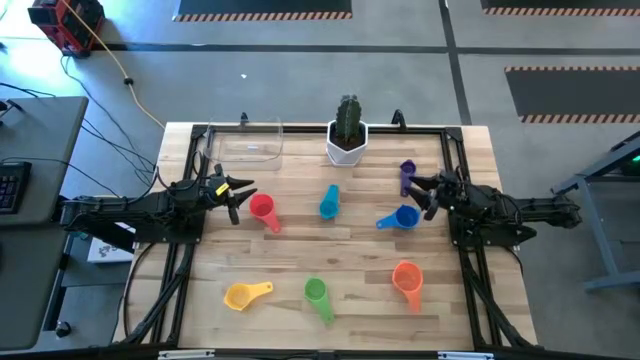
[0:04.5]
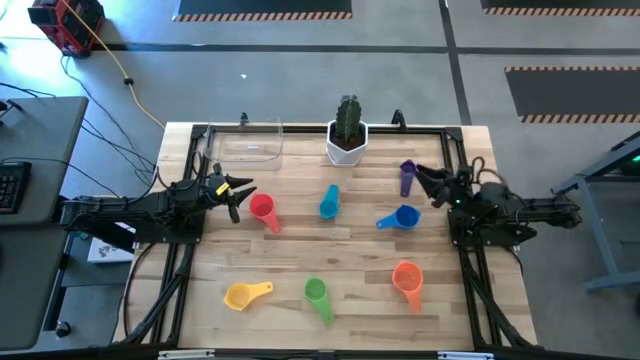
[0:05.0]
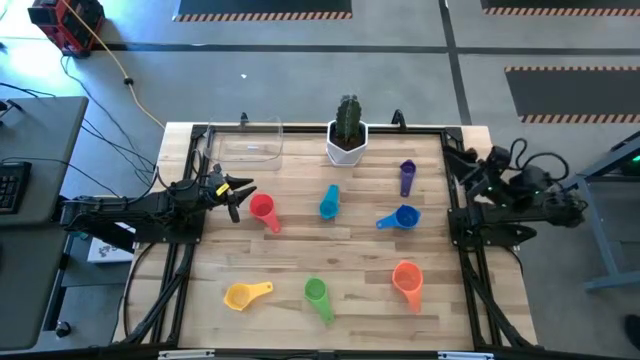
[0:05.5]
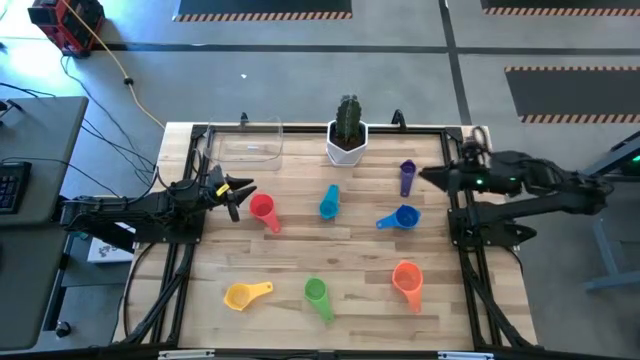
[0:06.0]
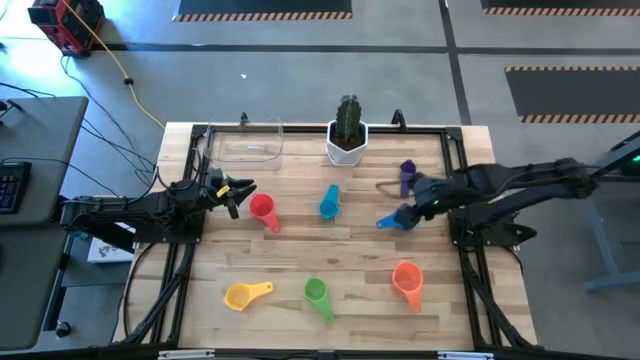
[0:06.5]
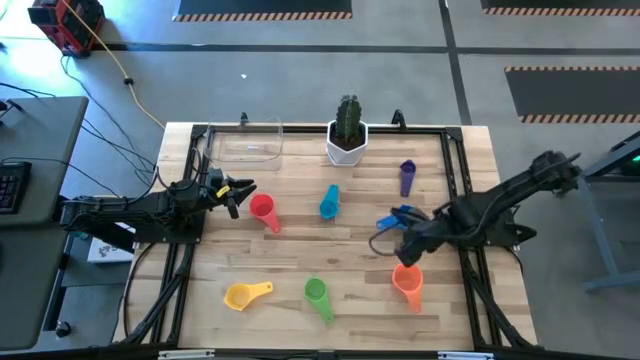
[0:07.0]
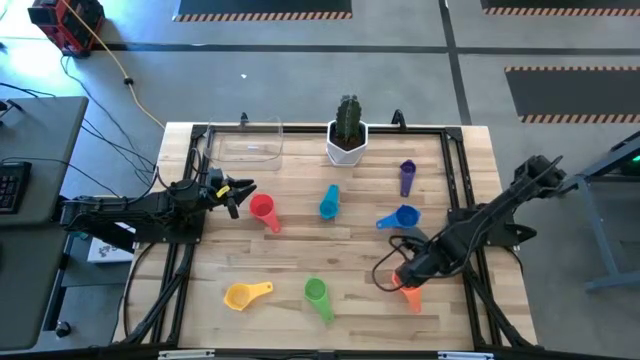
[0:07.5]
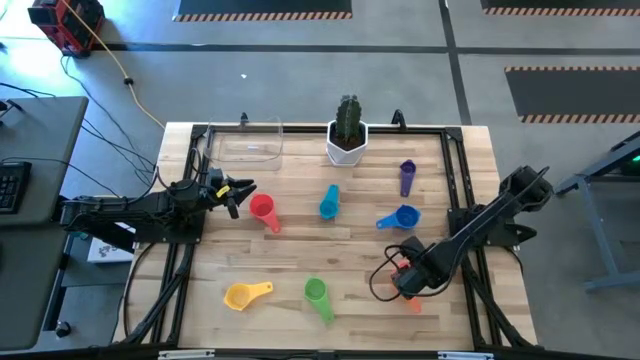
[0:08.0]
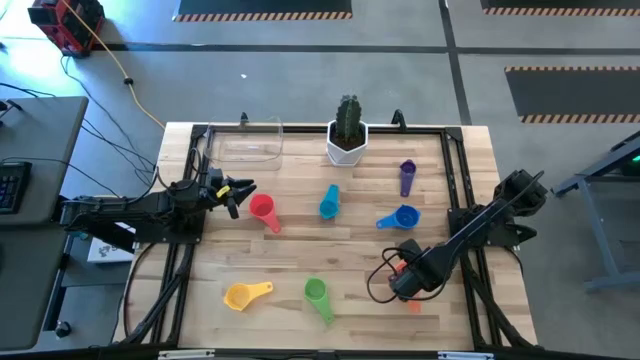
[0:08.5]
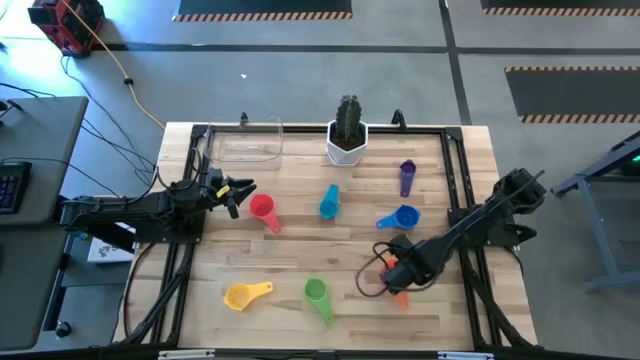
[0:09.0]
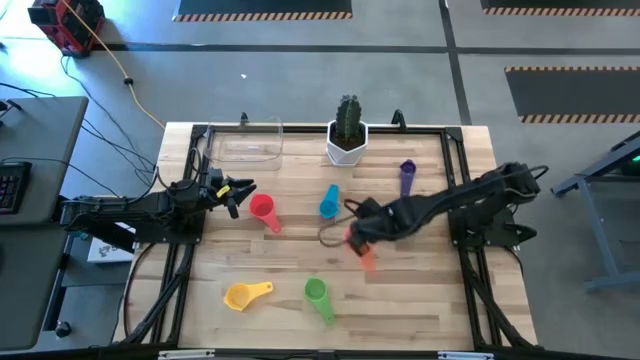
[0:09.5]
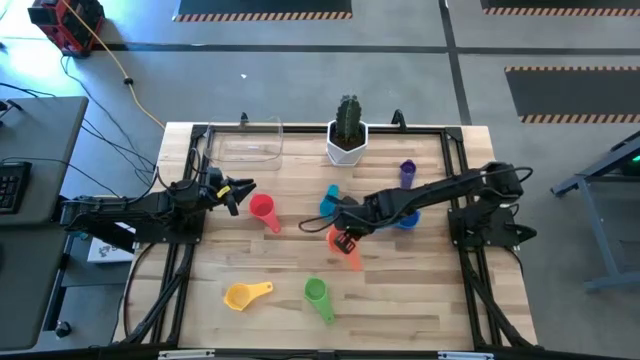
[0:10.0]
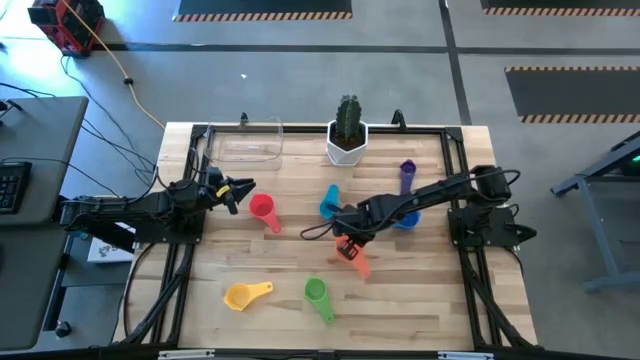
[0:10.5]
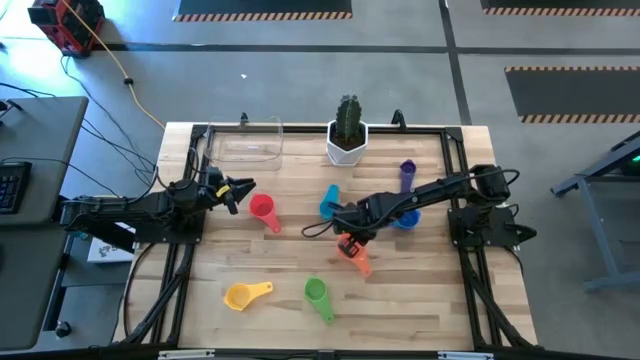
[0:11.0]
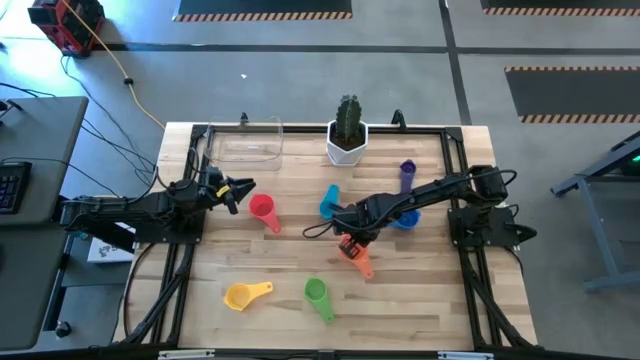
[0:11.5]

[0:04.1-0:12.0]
Task: Nest measuring cups in basket
Move the orange measuring cup to the middle of the table

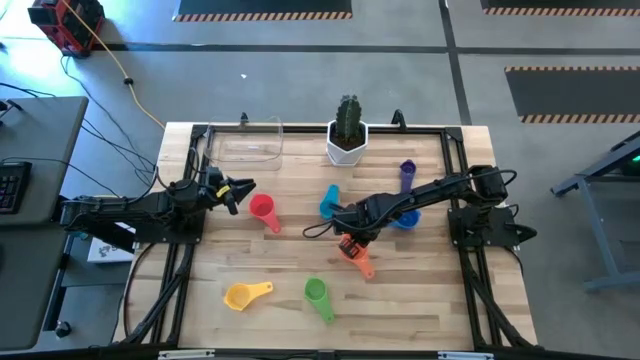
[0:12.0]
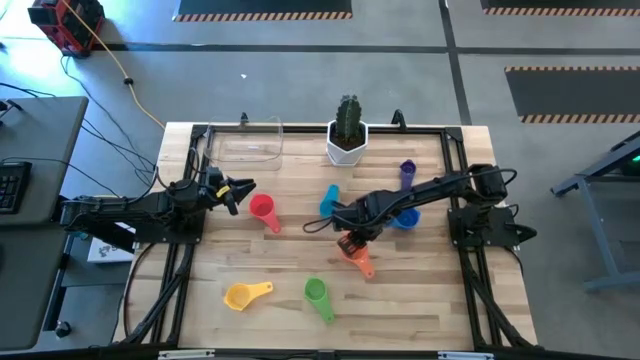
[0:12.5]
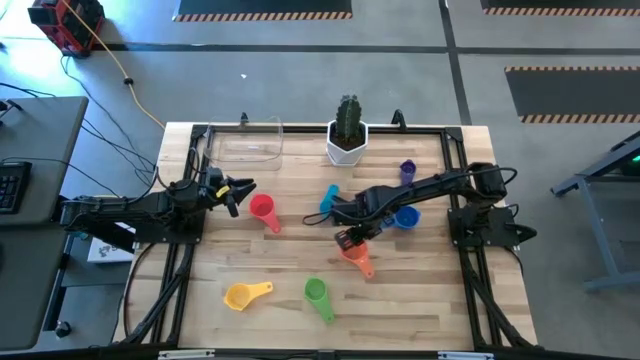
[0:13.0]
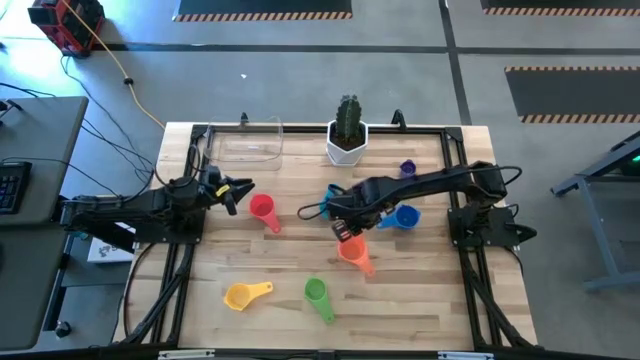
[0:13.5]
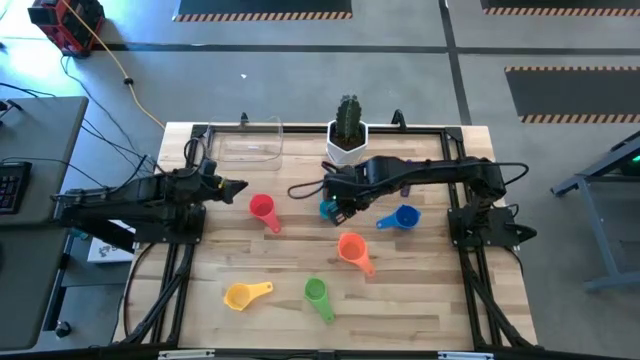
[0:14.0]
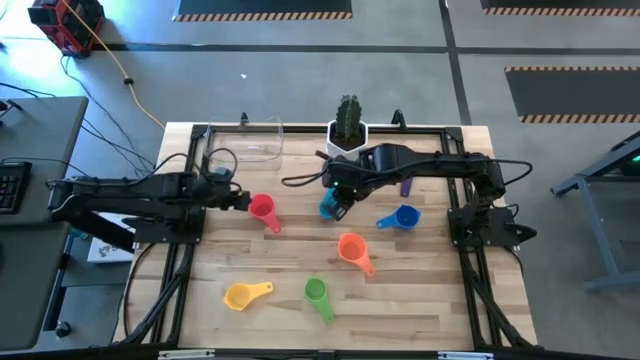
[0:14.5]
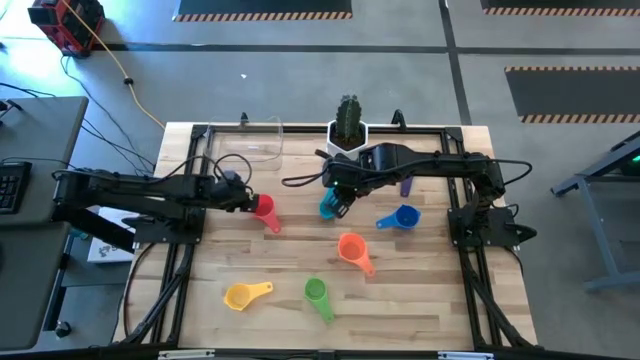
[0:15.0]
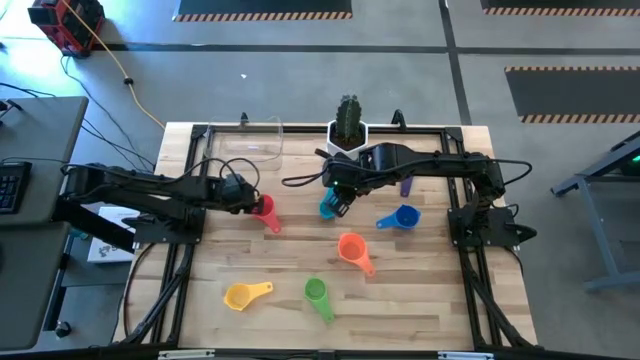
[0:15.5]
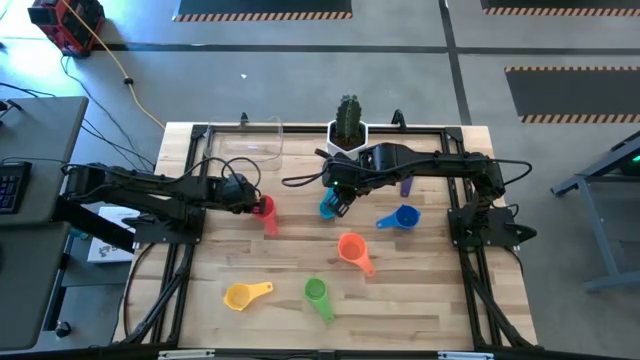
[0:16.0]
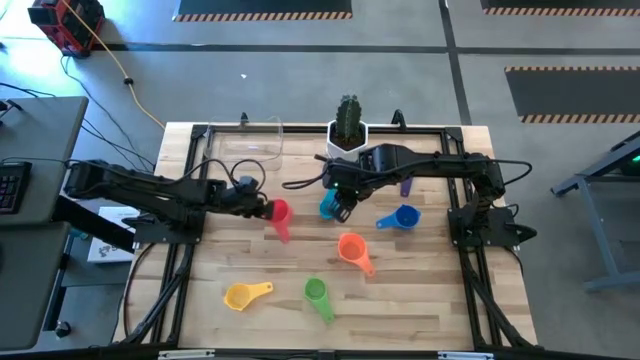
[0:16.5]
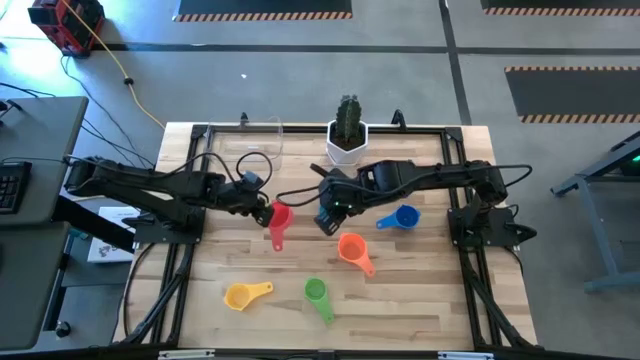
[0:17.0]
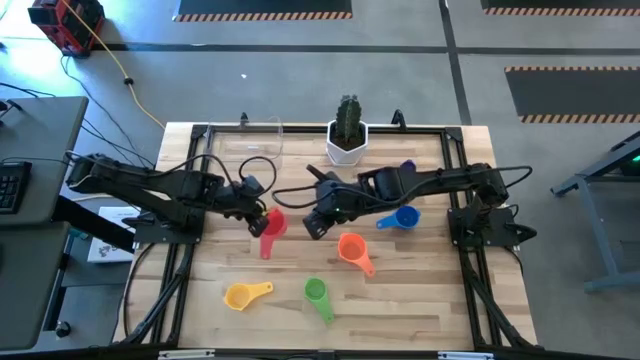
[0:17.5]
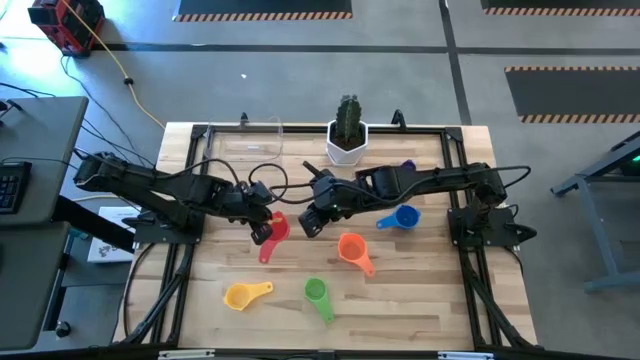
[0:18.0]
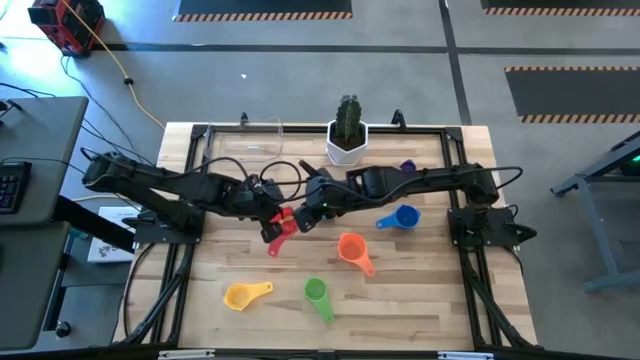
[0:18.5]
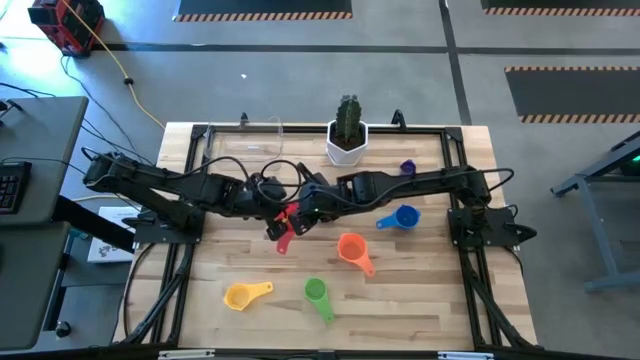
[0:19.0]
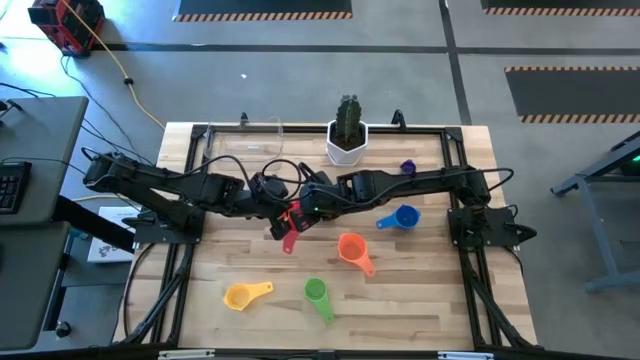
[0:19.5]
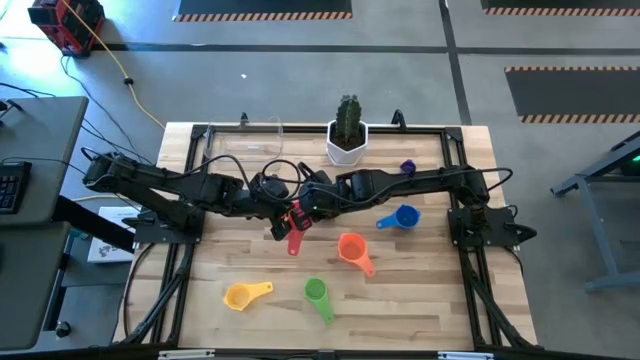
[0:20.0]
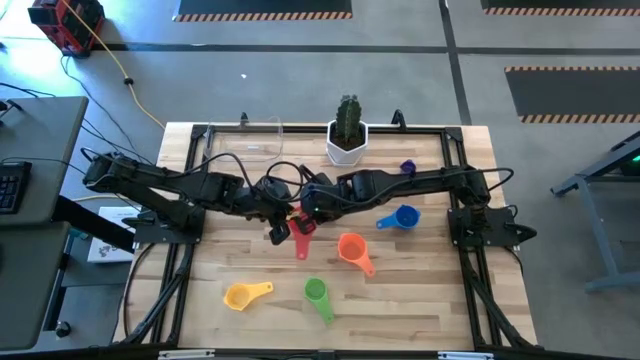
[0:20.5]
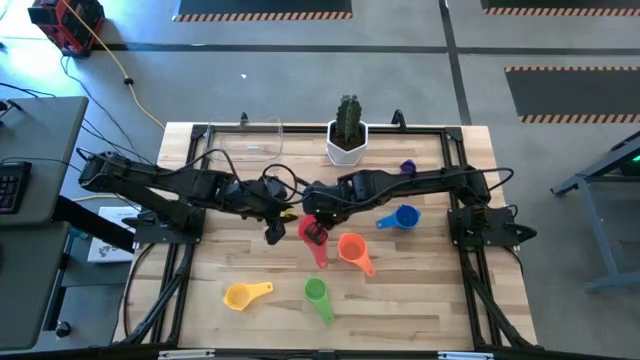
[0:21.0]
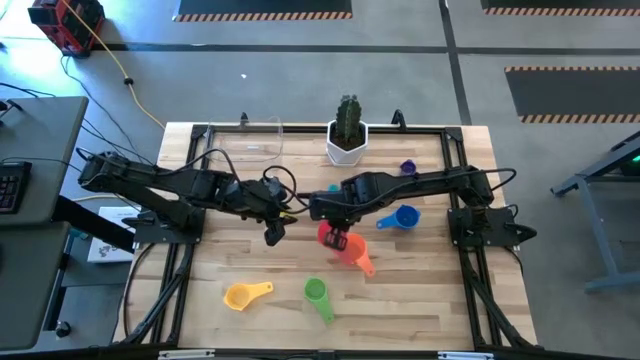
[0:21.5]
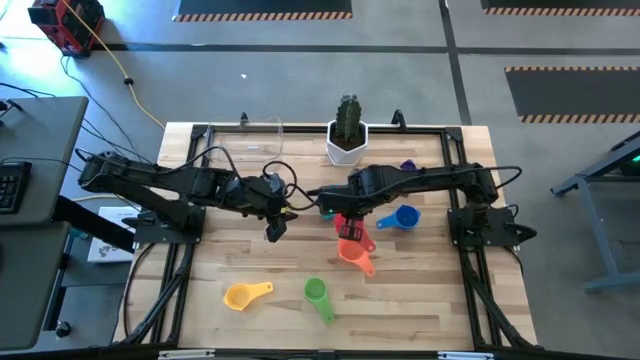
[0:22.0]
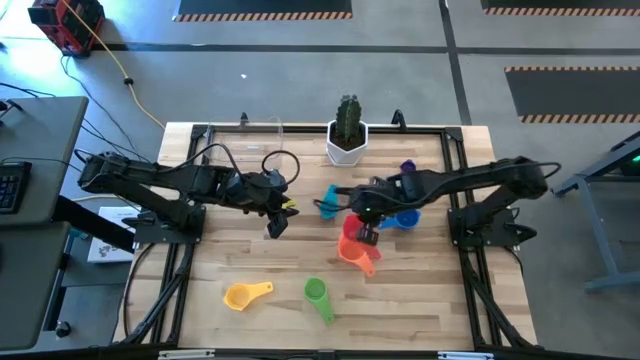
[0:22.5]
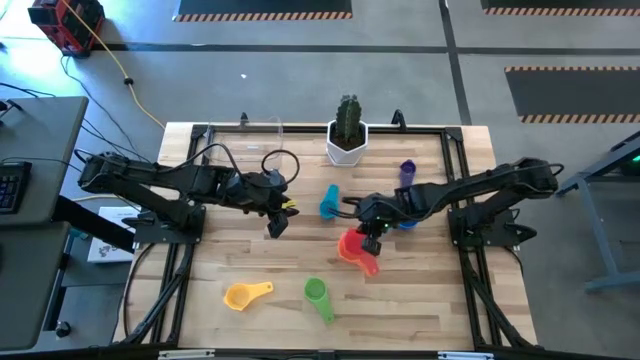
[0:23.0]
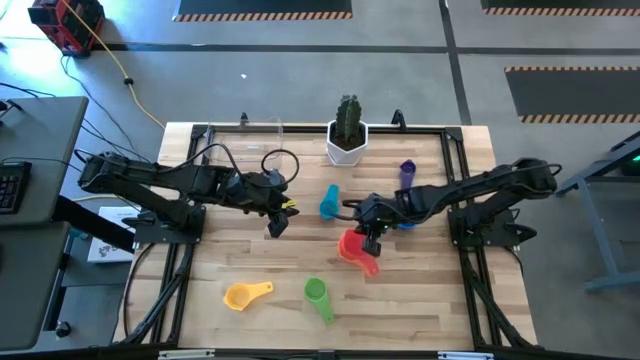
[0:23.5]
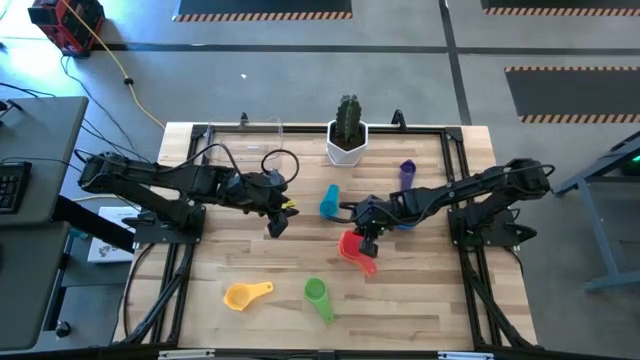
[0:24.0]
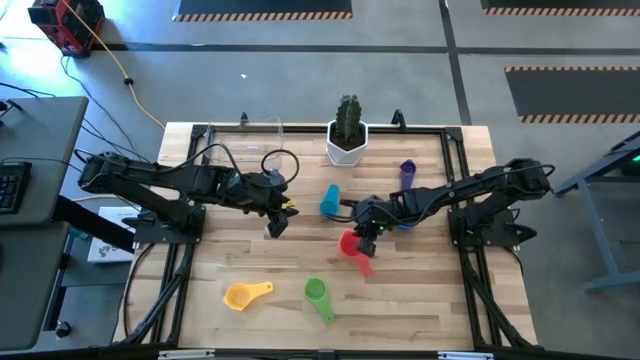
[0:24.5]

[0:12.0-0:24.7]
Stack the red measuring cup on the orange measuring cup

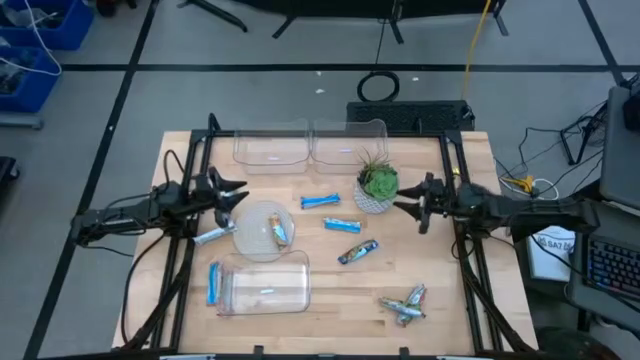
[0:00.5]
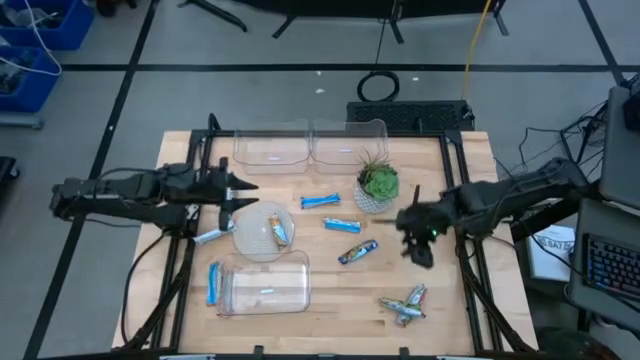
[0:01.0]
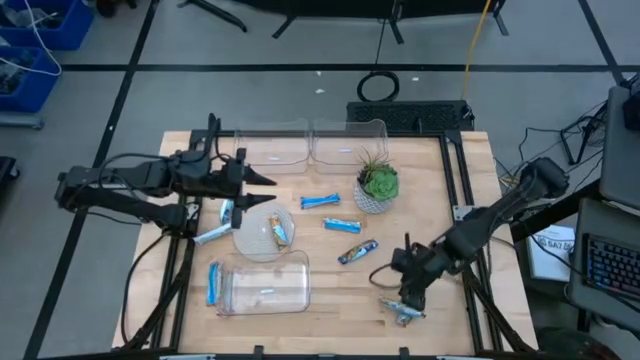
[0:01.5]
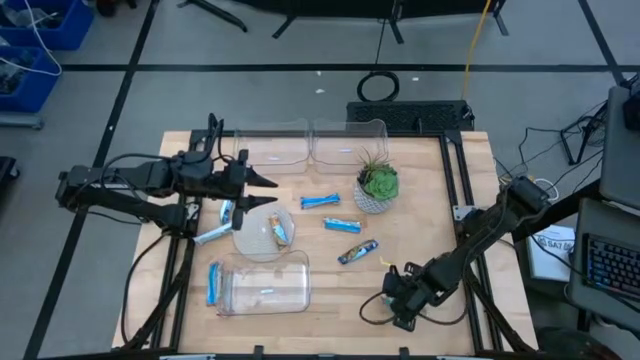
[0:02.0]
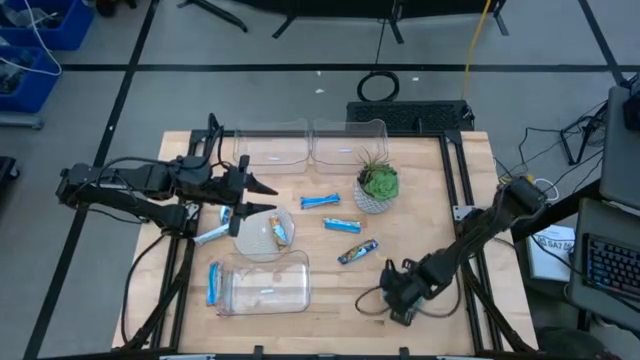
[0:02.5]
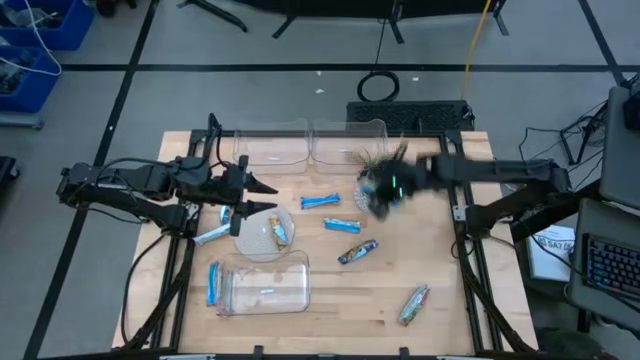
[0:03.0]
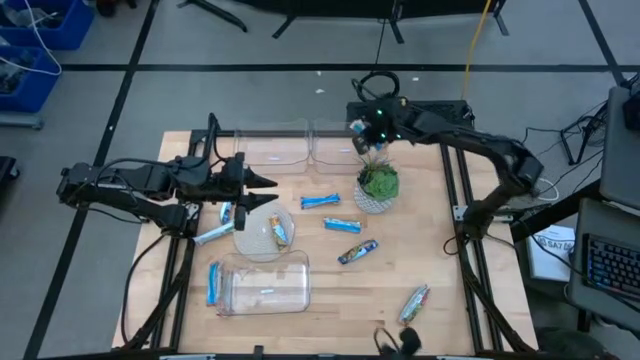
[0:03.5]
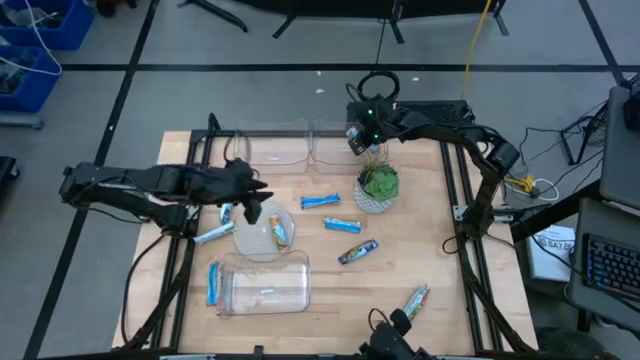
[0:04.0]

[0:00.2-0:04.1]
Task: Pick and place Granola Bars by type
Put the yellow granola bar into the top right transparent bin
